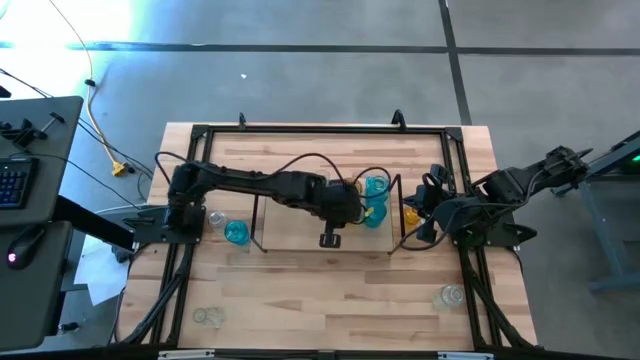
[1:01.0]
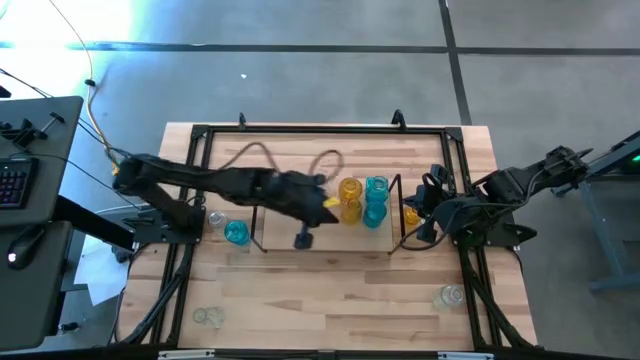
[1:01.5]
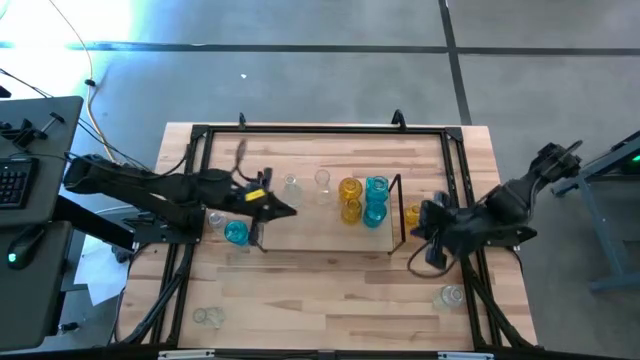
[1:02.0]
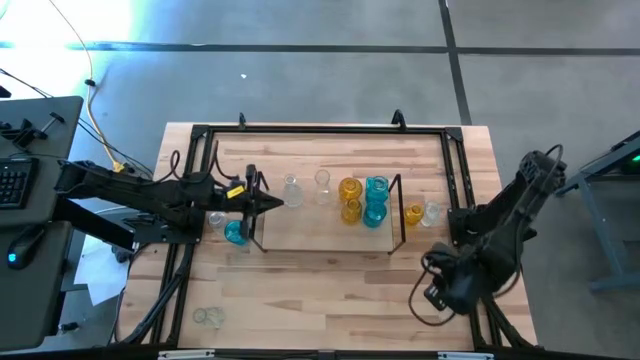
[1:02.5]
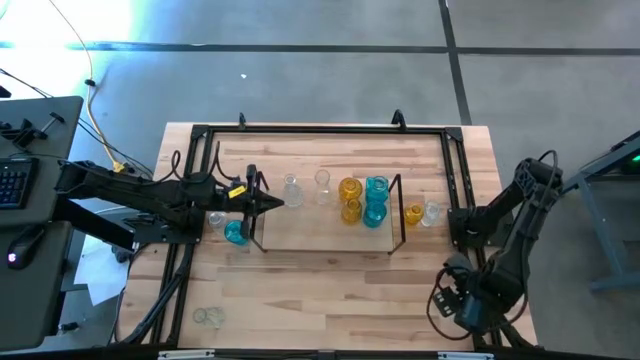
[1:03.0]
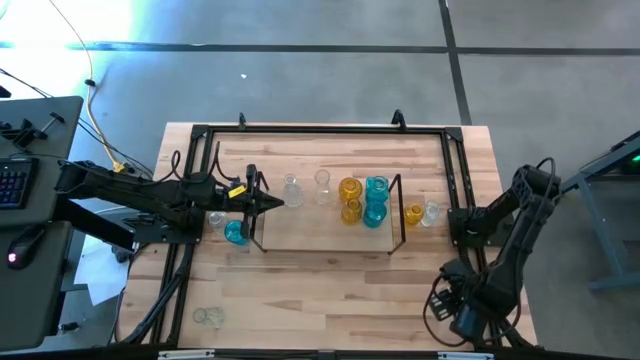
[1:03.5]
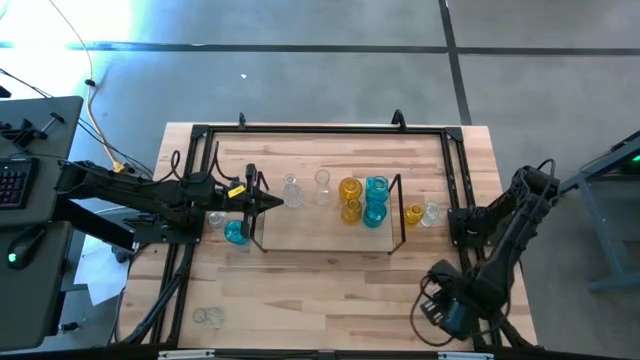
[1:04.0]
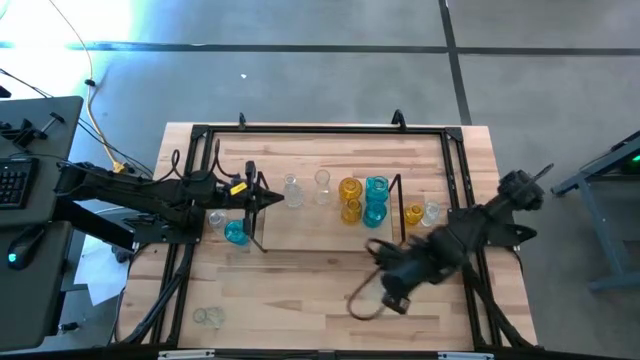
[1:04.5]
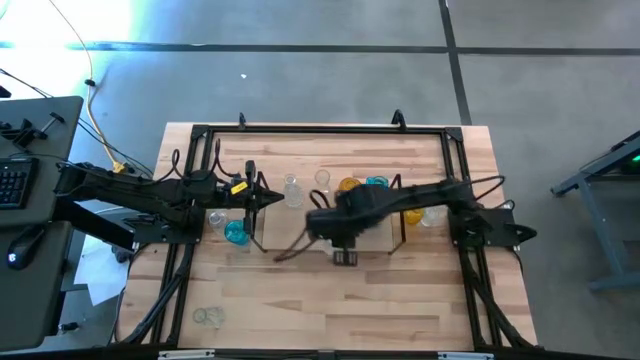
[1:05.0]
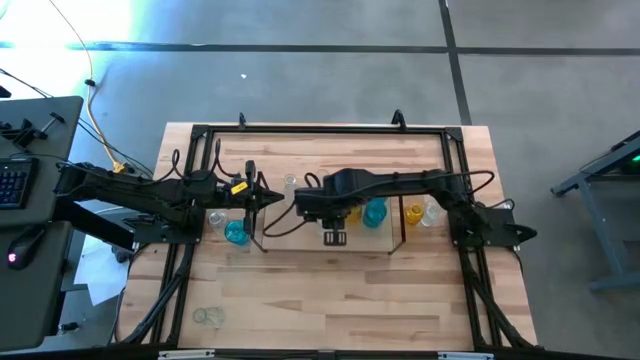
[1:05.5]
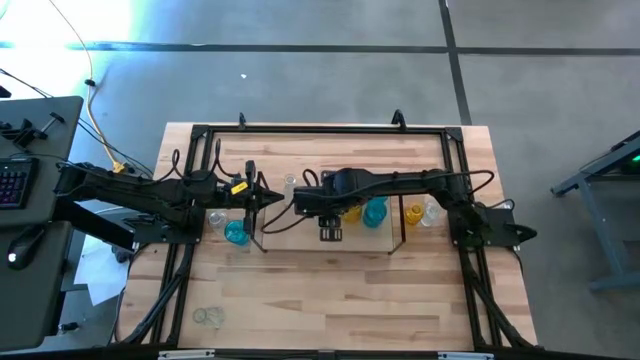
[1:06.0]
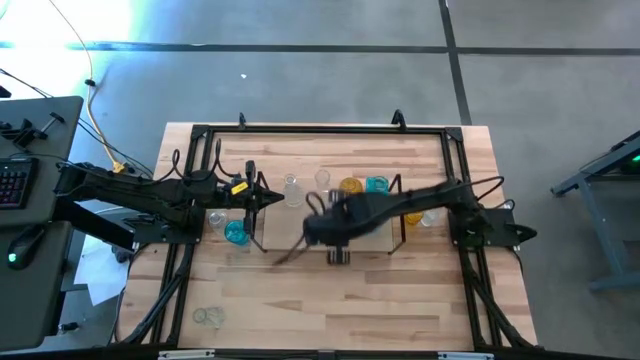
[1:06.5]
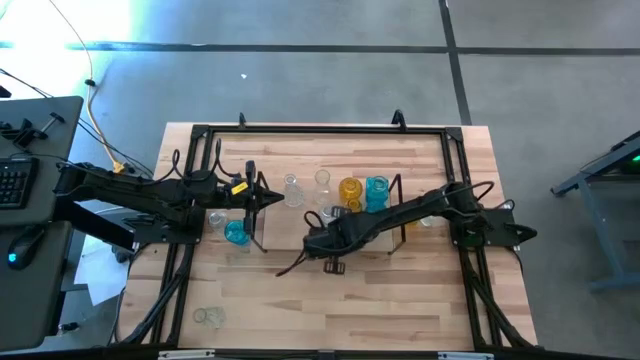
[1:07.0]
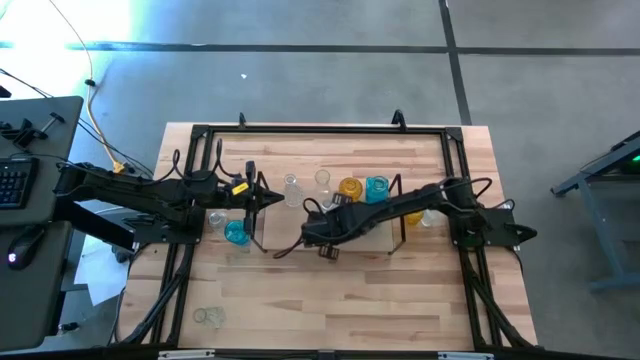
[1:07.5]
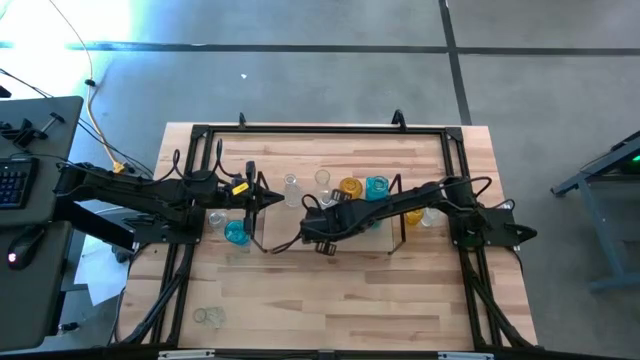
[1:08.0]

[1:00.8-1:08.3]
Task: sort vases onto shelf
Put the transparent vase on the shelf aligned with the other transparent vase

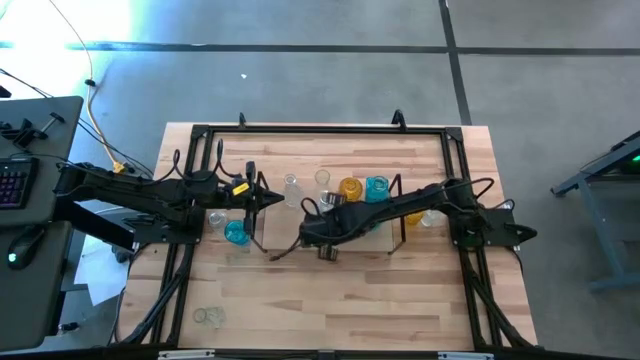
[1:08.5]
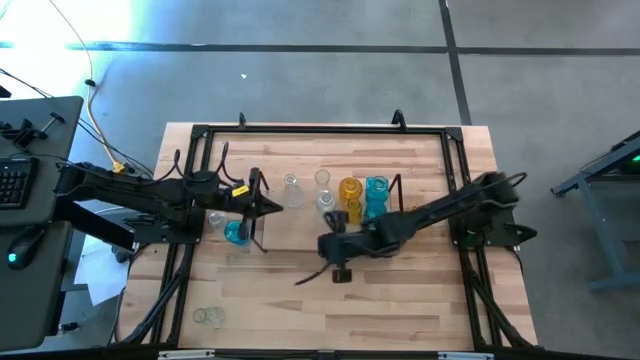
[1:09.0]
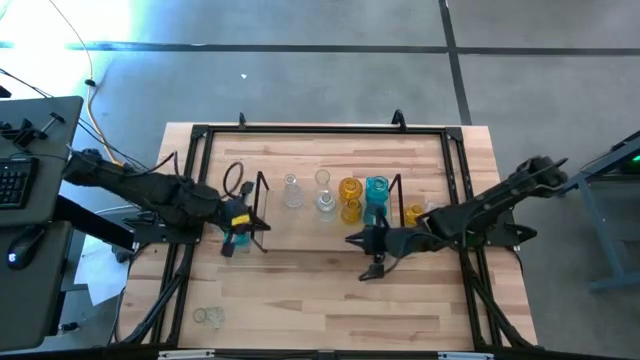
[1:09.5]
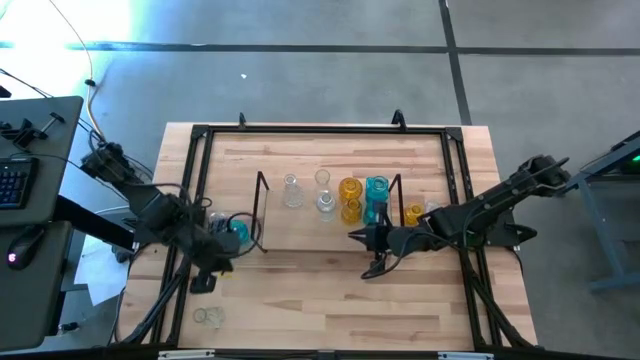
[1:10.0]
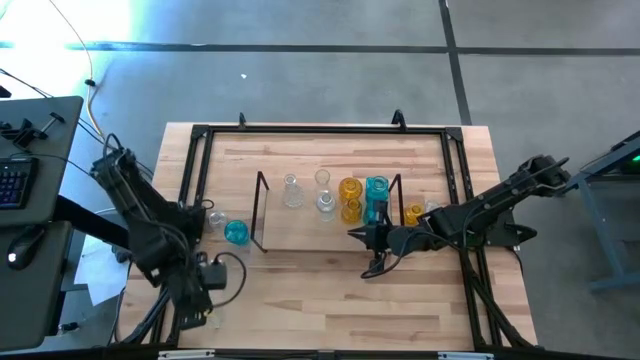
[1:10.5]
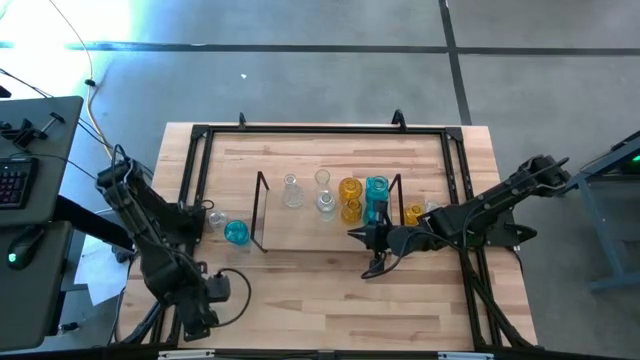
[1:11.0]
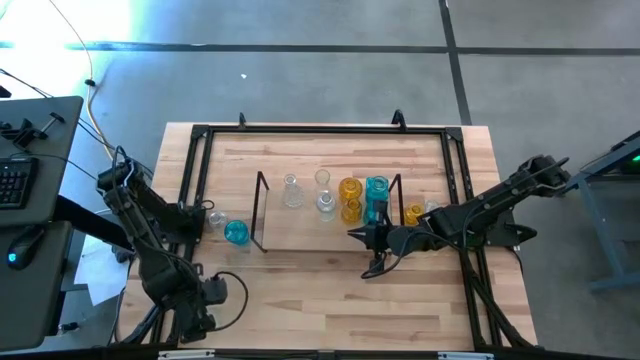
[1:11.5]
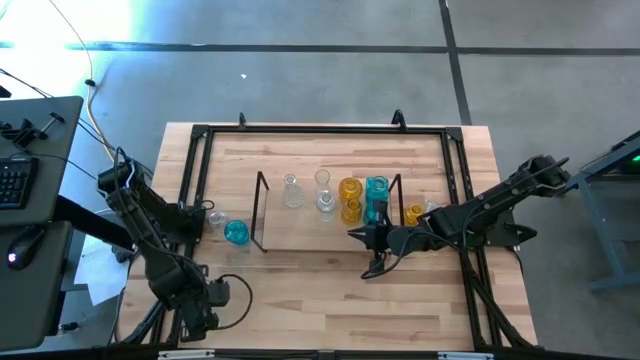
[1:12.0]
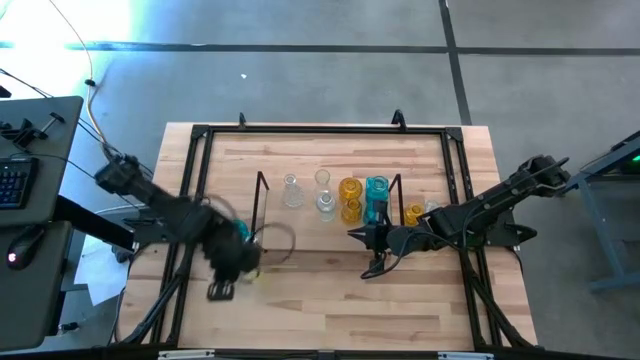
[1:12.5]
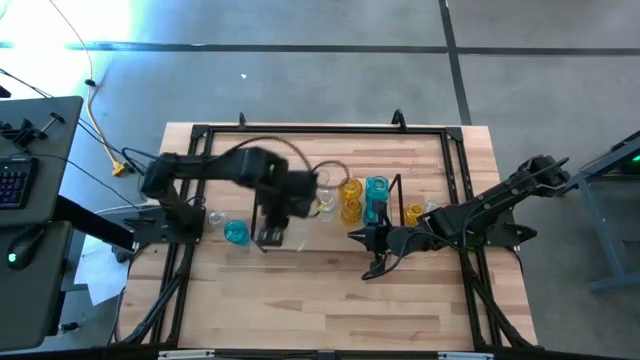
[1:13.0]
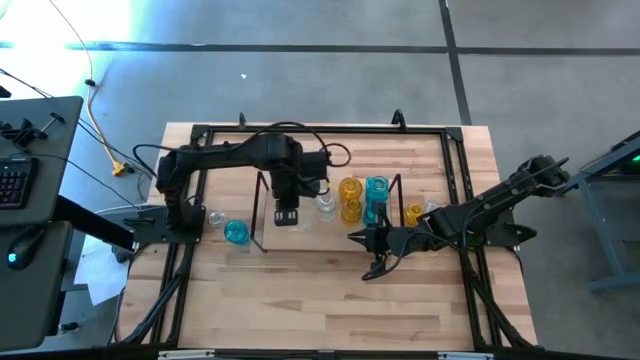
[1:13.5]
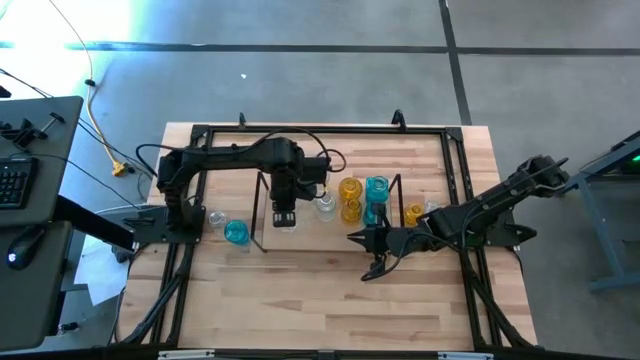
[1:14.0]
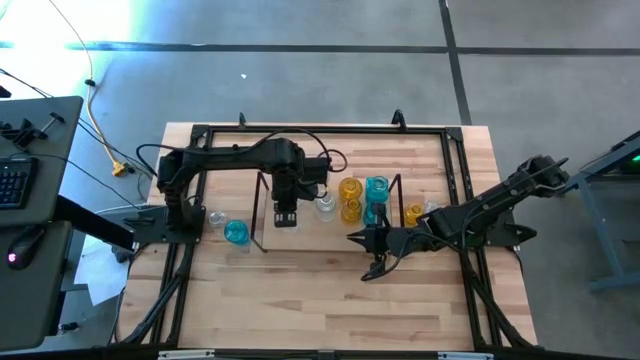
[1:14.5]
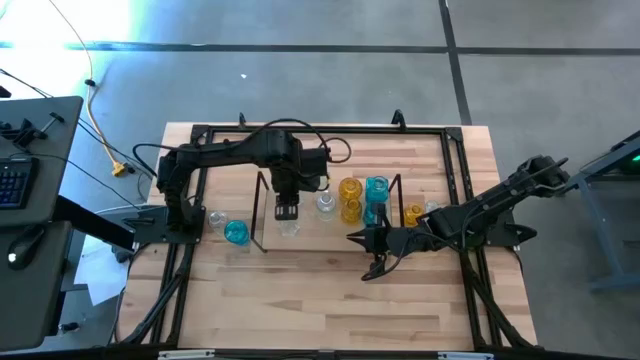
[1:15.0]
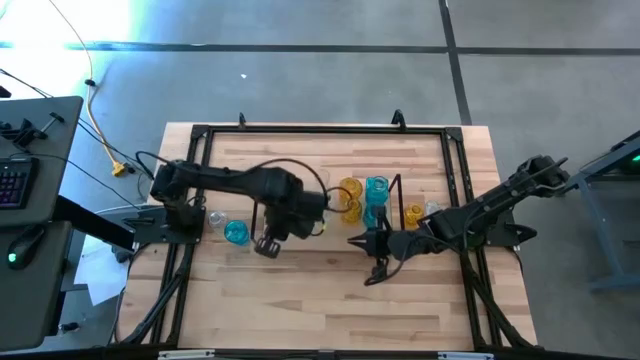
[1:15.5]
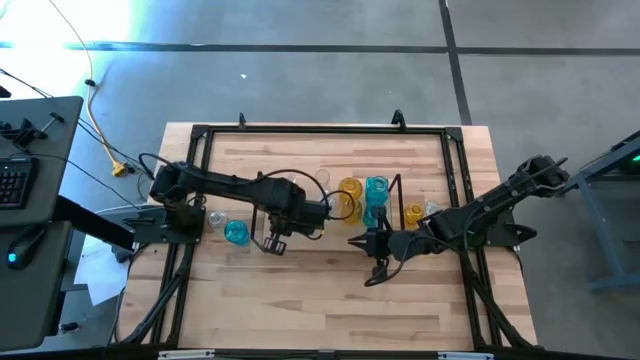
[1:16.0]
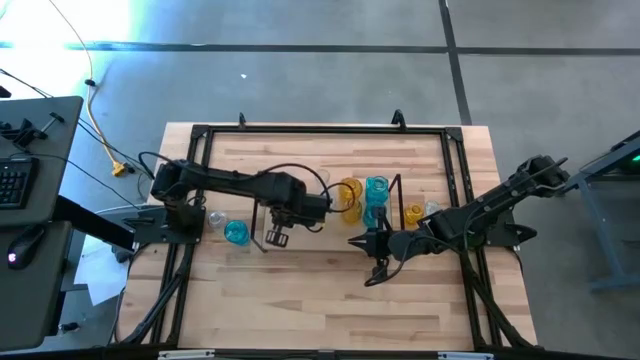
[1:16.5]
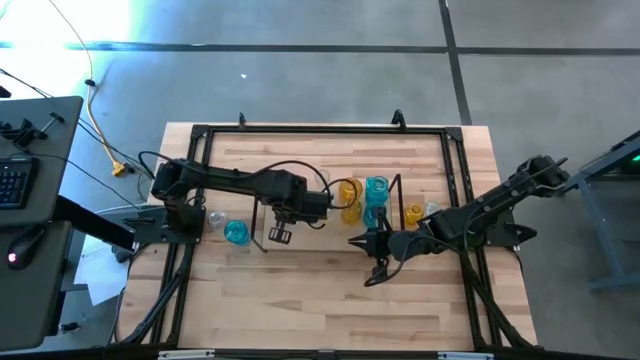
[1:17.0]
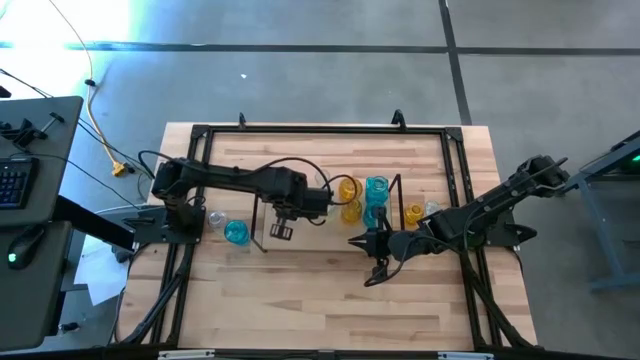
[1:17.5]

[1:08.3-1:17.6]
Put the transparent vase on the shelf aligned with the other transparent vases

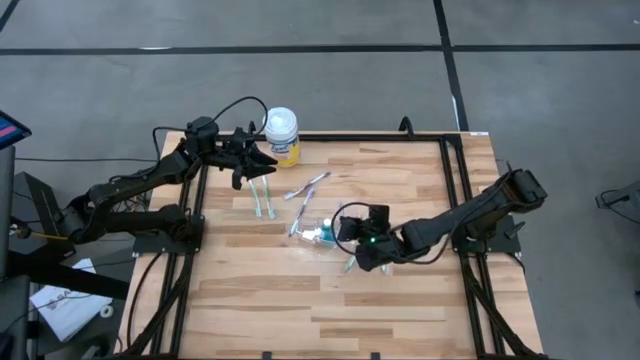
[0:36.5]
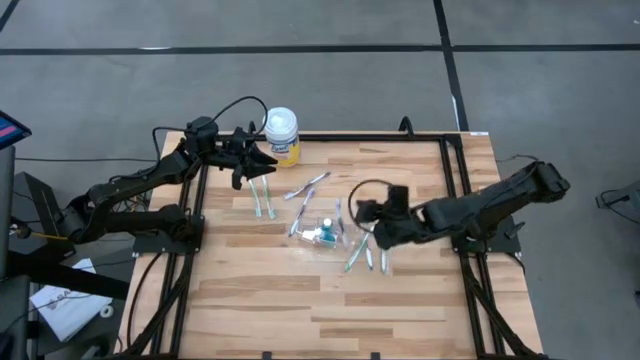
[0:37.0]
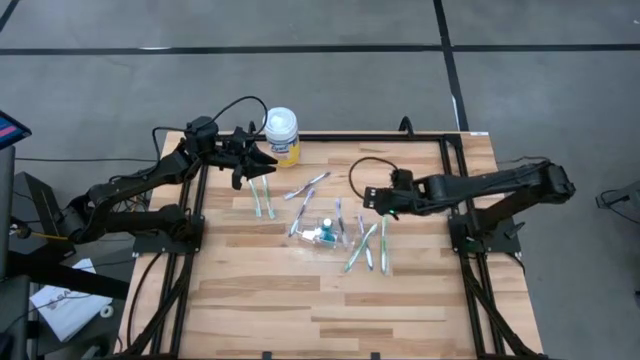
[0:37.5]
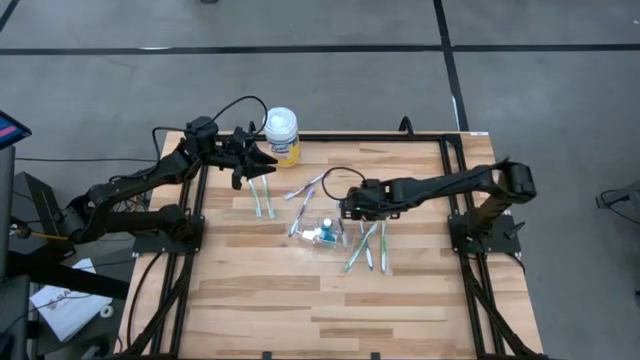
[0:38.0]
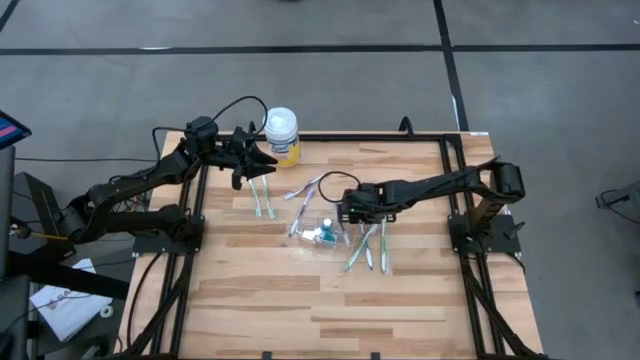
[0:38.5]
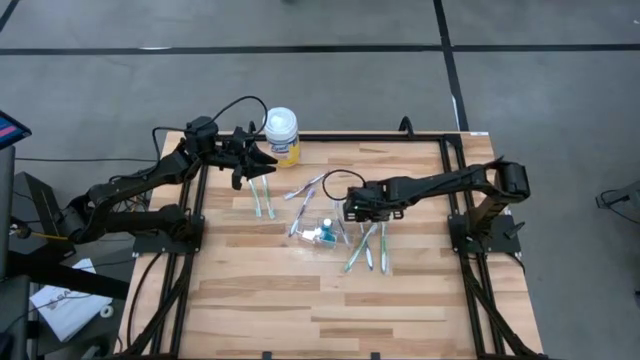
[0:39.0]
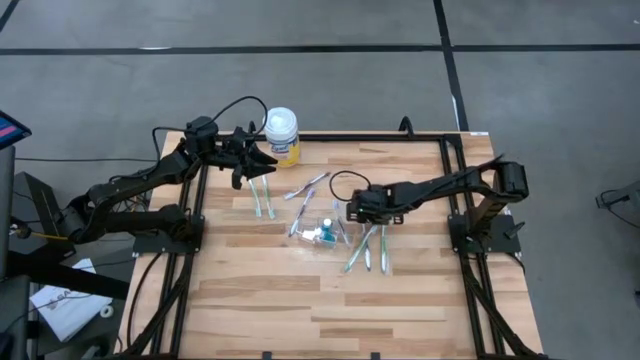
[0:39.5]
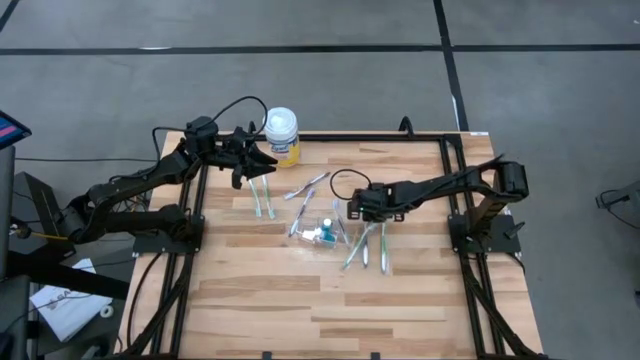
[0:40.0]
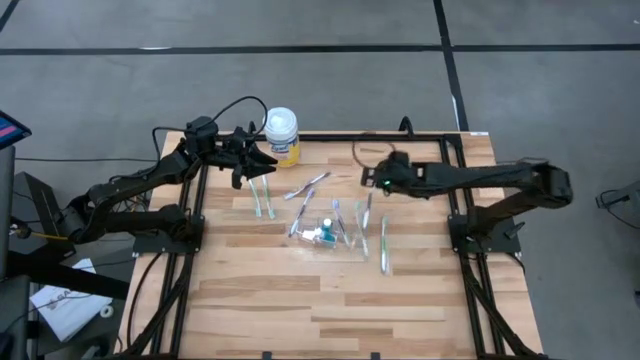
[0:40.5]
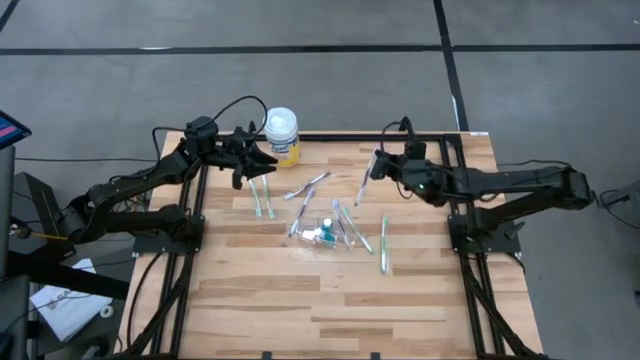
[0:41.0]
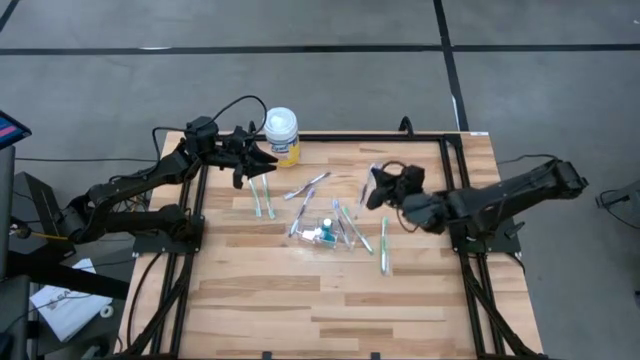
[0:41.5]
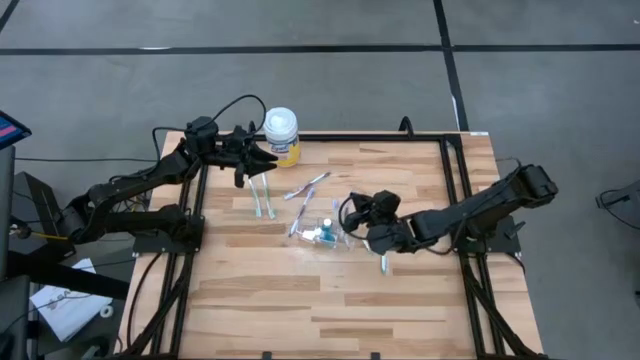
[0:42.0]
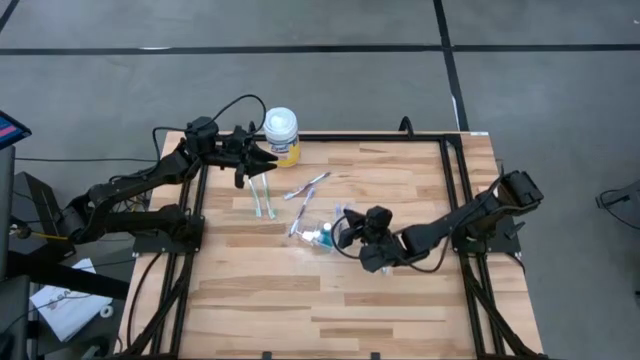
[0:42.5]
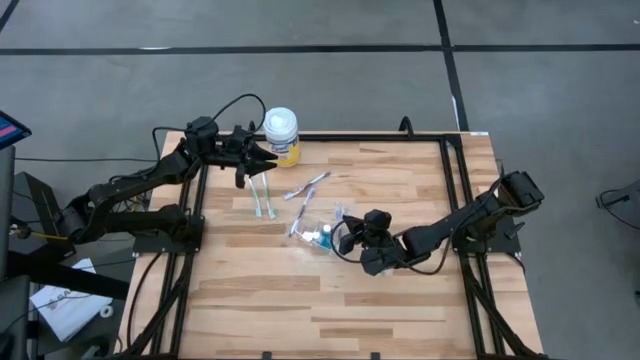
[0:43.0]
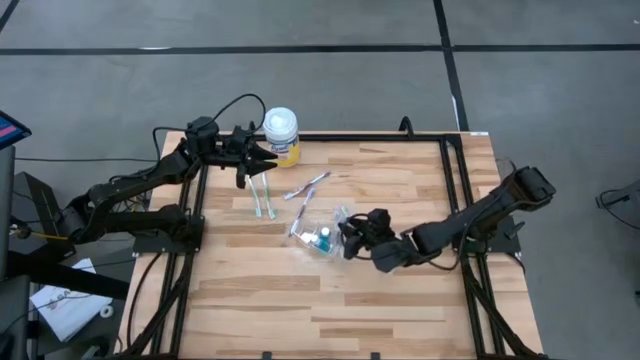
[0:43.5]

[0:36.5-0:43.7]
Task: Pick & Place toothbrushing station
Put the purple toothbrush into the right compartment of the transparent organizer
